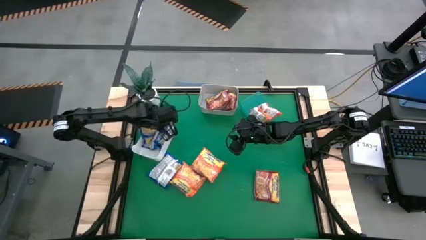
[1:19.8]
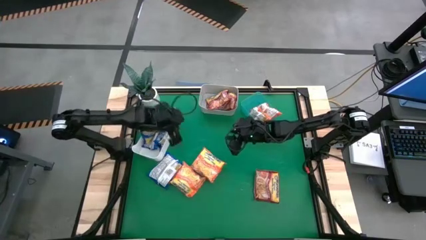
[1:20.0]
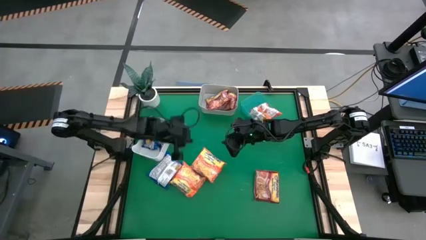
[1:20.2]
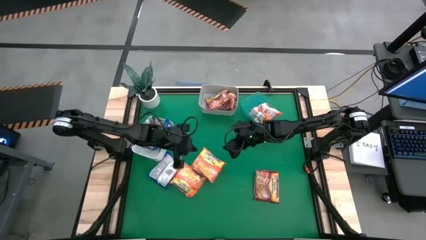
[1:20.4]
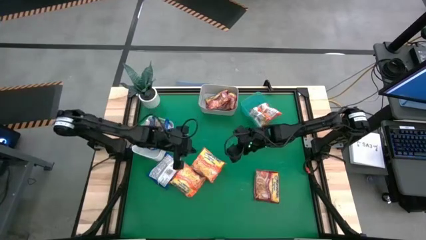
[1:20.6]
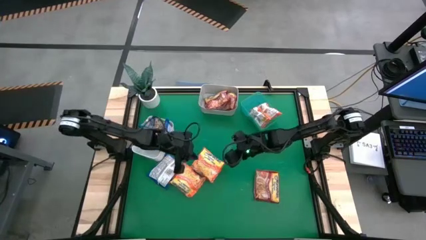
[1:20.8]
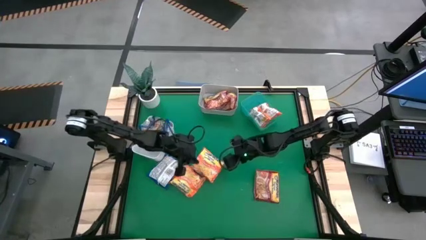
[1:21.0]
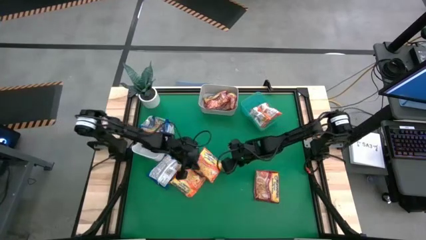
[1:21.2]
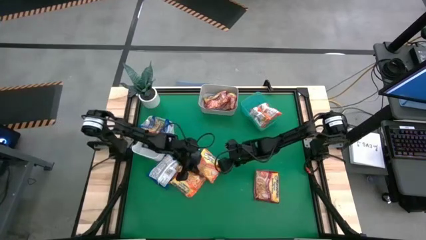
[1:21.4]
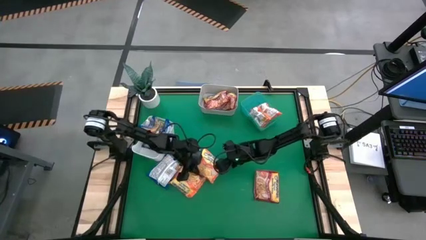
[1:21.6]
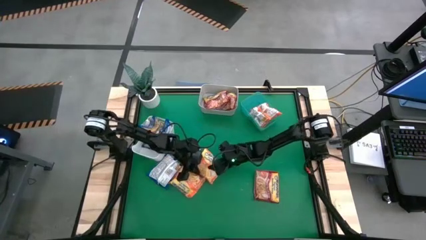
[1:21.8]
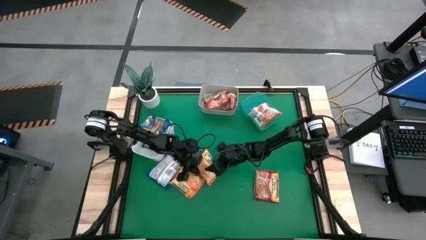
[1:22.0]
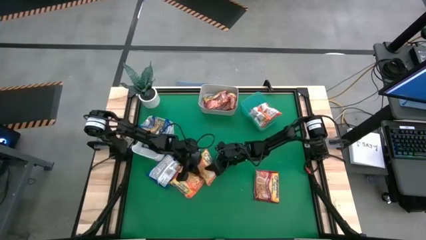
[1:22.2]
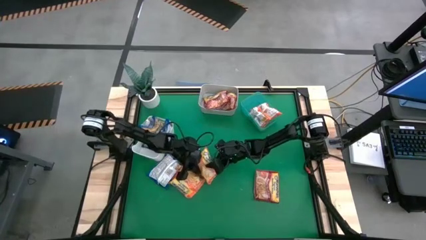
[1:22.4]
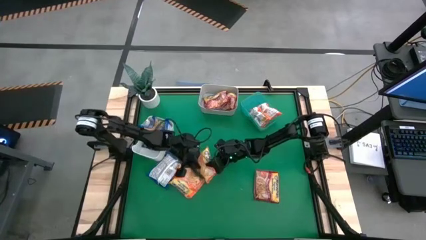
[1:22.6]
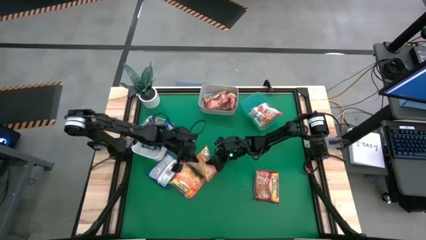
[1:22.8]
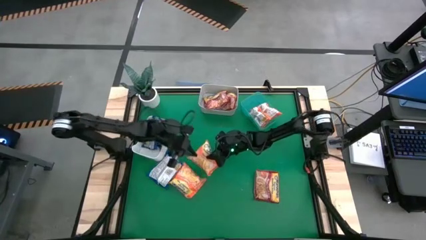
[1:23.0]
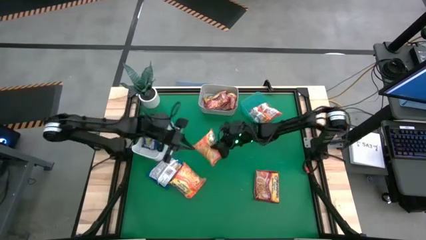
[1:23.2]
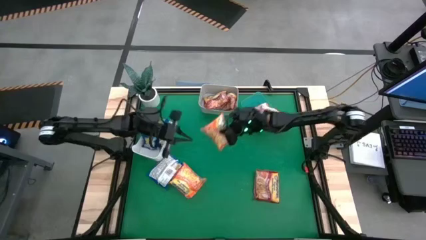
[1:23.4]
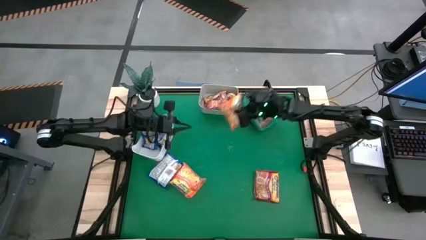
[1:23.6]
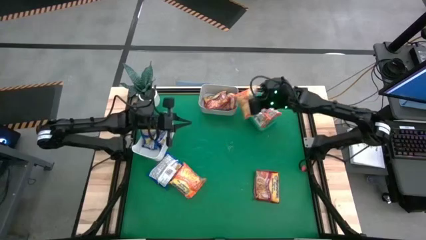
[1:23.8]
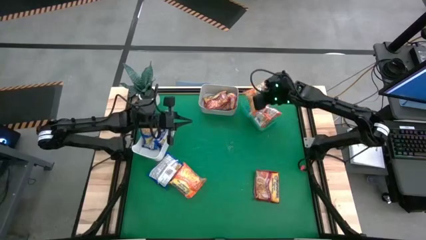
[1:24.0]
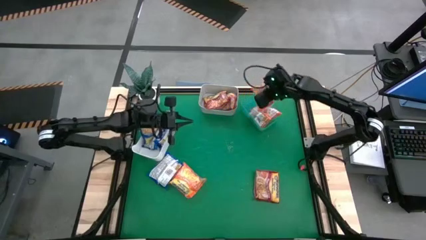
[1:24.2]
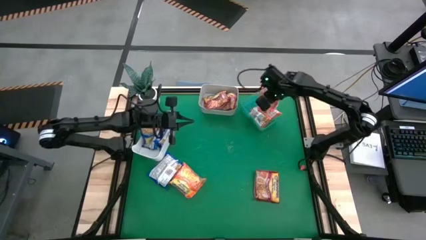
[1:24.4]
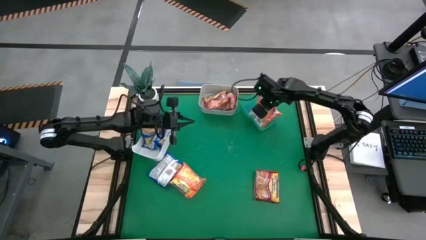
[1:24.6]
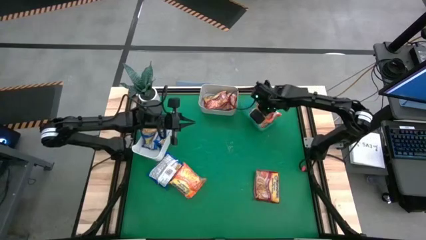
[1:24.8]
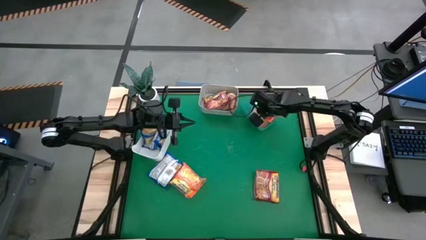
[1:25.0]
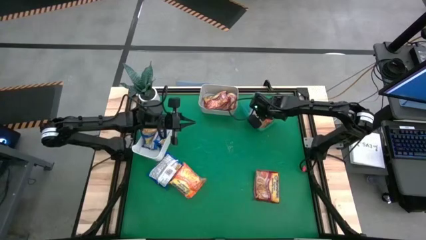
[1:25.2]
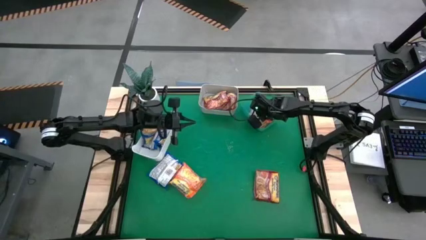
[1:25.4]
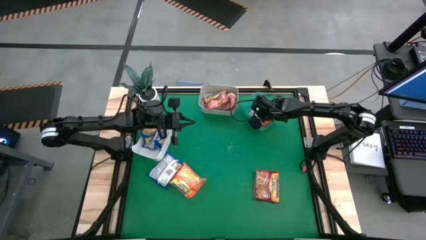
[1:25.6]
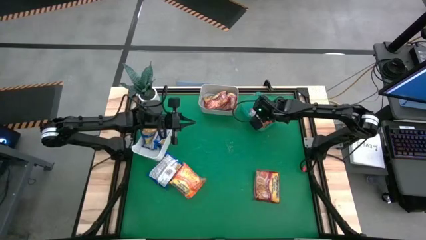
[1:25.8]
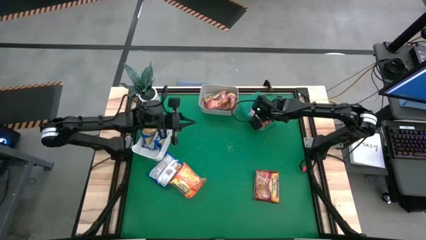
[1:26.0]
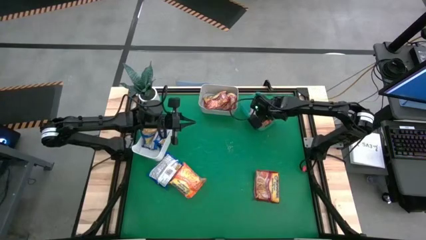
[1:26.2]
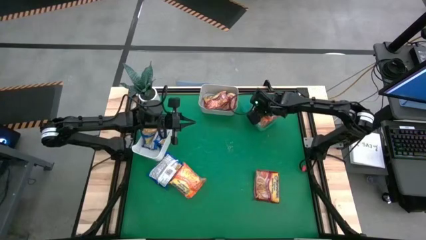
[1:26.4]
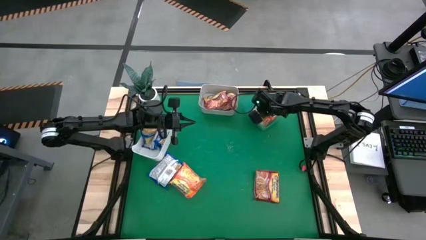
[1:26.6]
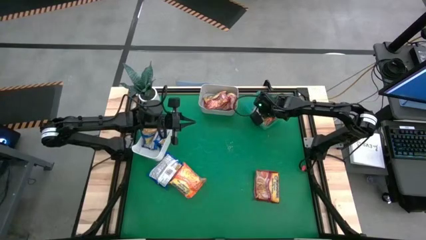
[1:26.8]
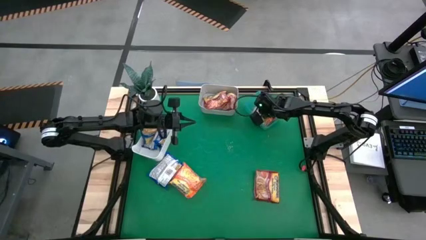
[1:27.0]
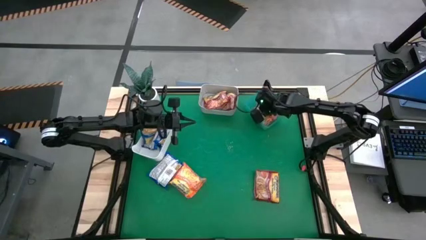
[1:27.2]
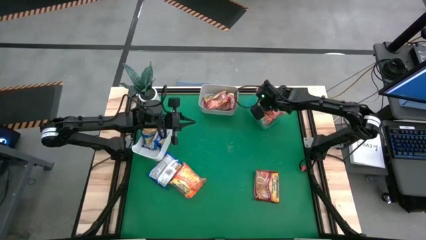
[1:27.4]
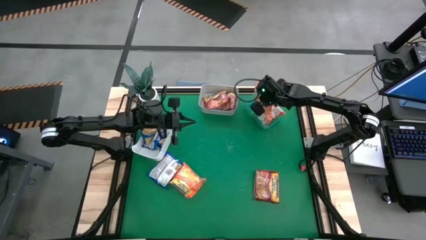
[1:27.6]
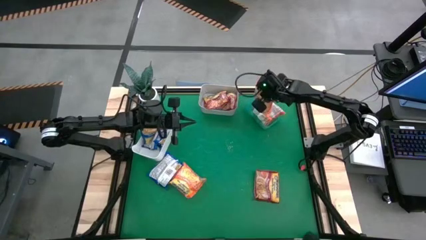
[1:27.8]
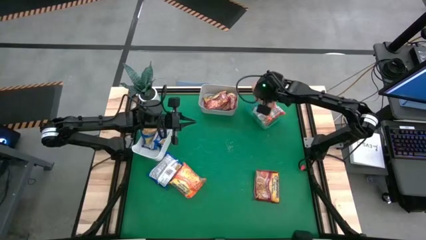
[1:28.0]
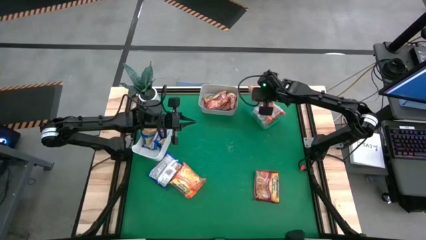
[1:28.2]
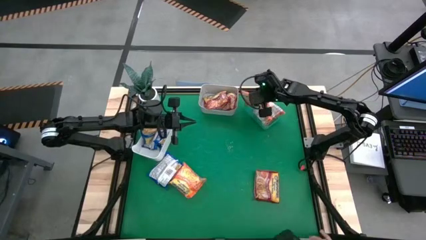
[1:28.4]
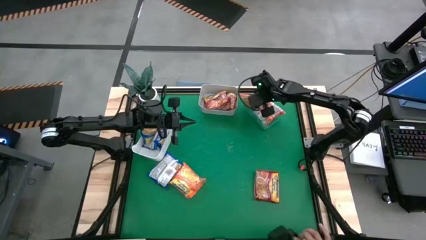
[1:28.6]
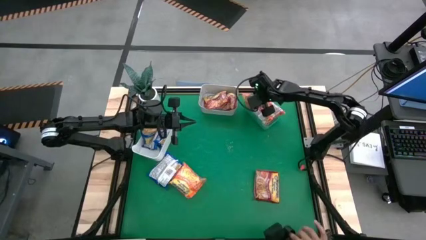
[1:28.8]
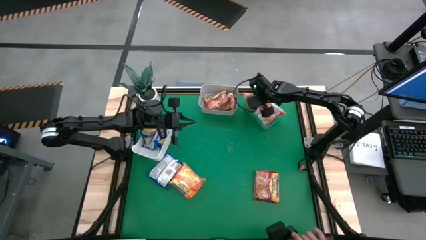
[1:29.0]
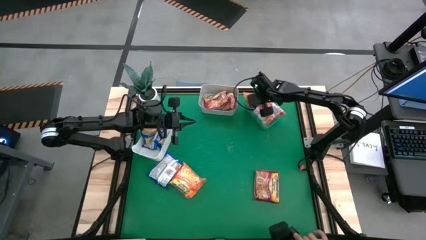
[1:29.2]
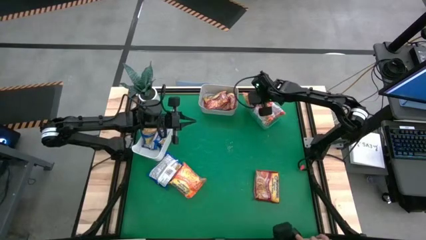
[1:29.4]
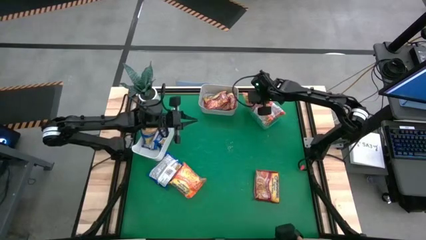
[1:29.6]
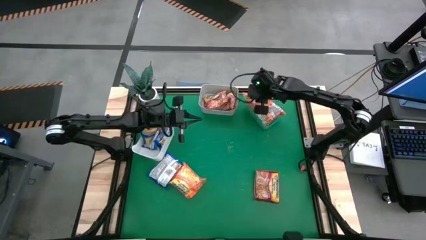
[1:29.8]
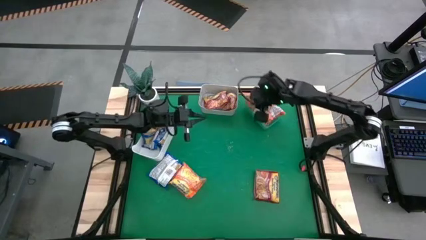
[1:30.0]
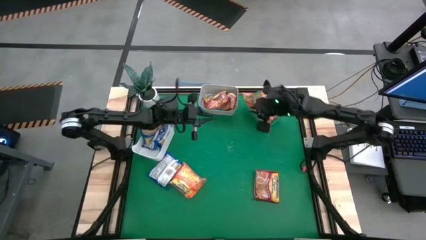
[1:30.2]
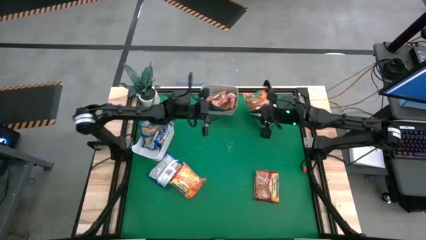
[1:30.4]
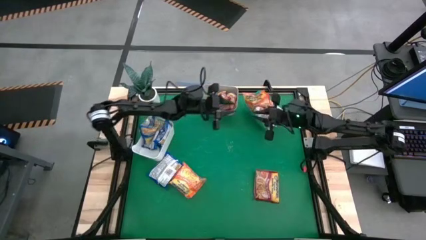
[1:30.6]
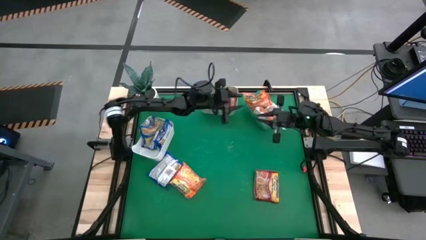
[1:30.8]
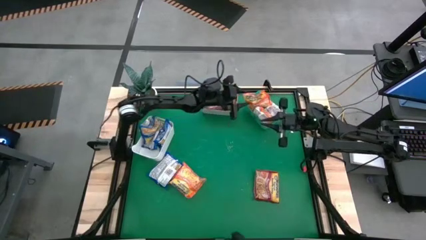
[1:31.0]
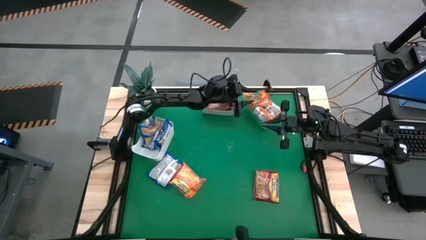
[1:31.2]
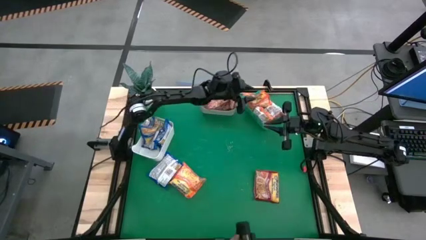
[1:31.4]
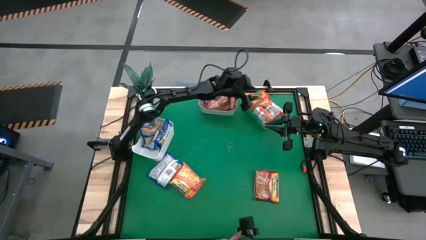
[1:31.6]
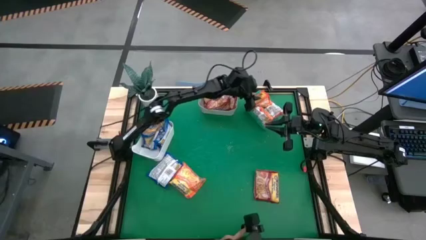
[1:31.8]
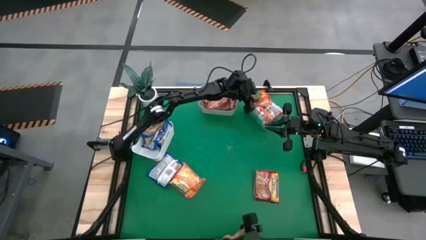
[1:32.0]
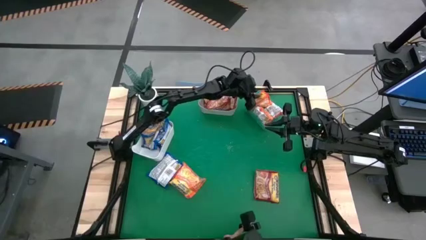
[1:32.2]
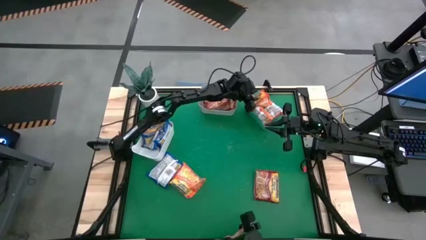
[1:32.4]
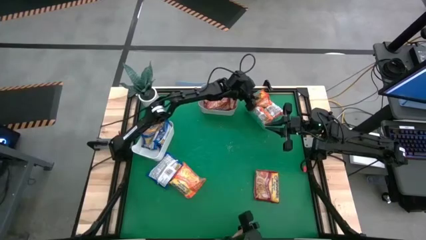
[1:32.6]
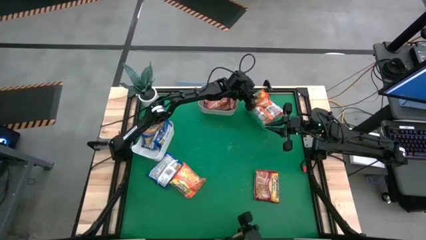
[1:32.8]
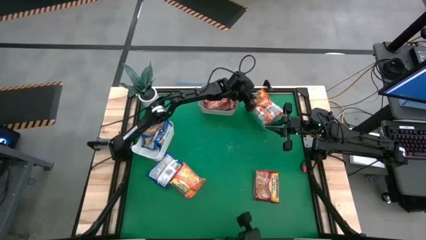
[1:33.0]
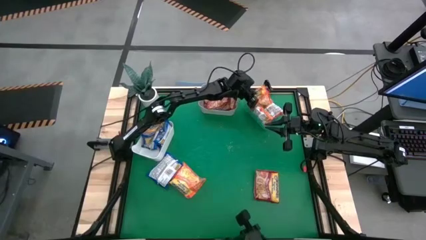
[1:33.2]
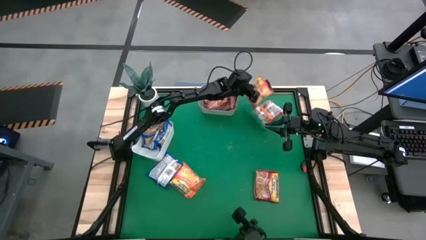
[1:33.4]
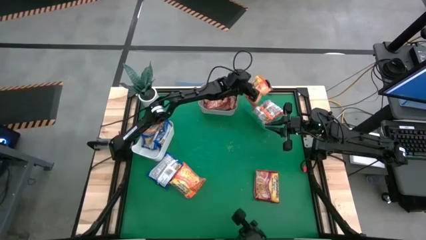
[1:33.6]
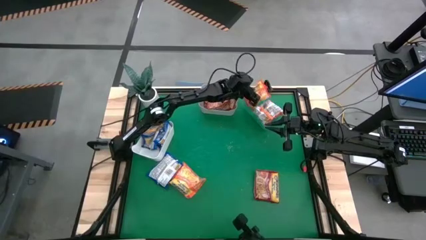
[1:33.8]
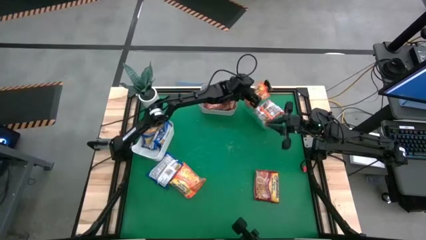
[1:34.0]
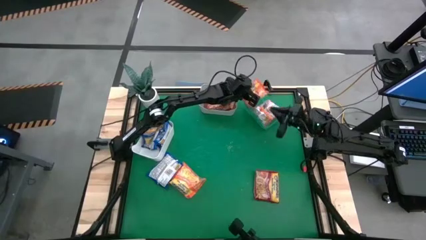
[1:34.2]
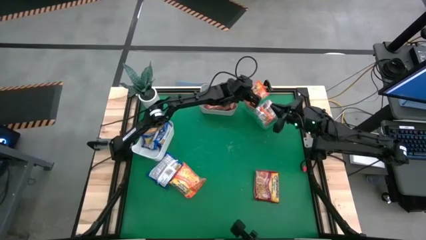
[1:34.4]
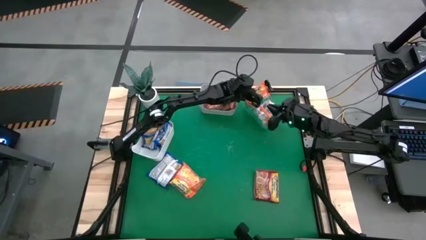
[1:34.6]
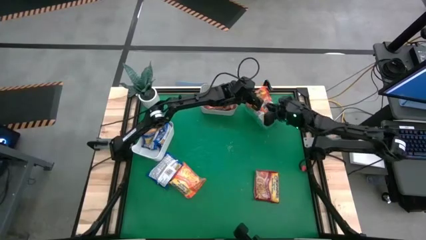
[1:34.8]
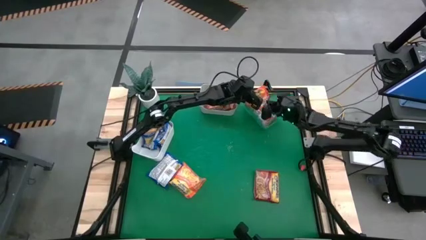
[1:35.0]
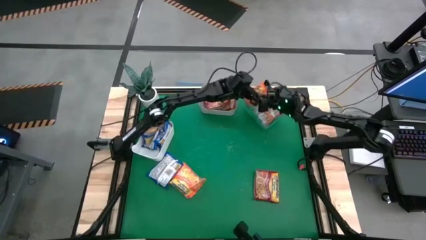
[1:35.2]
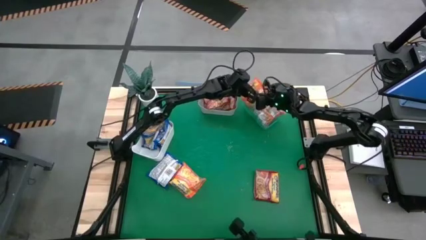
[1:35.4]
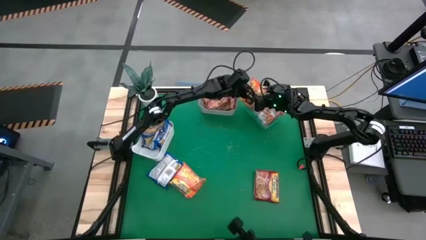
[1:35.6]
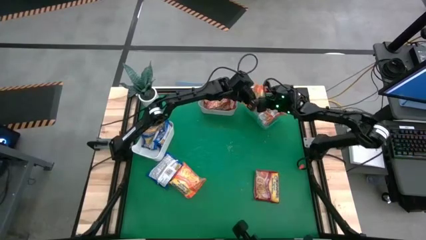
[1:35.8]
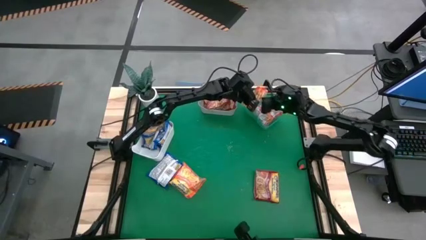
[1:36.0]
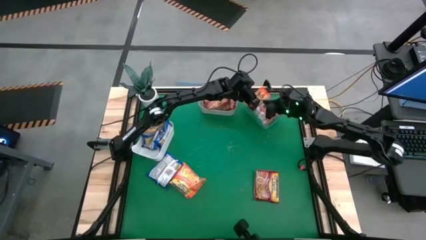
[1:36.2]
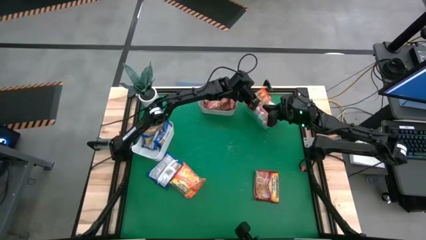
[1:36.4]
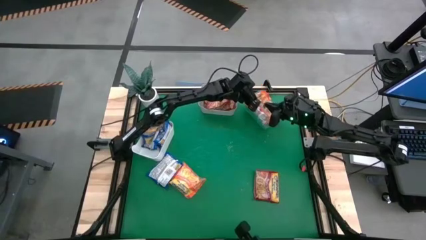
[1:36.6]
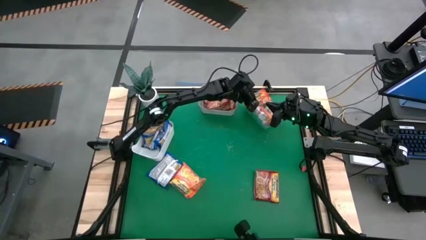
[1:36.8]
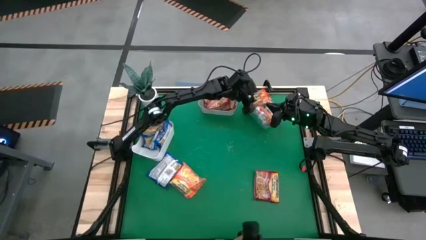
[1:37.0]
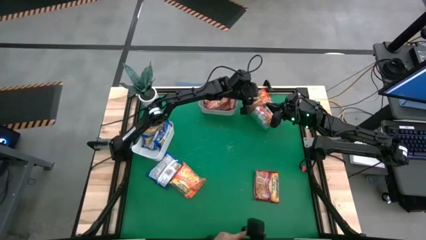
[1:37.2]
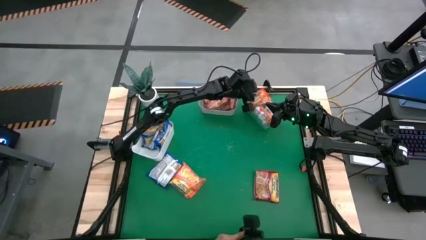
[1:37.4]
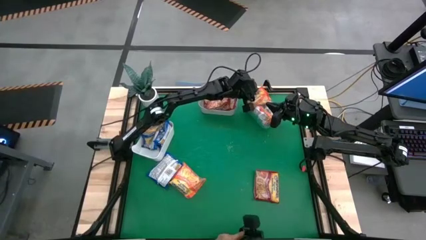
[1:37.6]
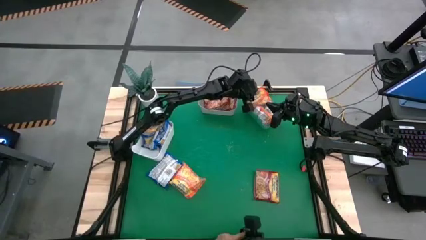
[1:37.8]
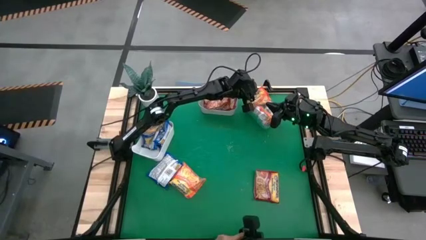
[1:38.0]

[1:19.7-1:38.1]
Task: Sort Maruchan noodles
Put the orange noodle pack into the green bin
